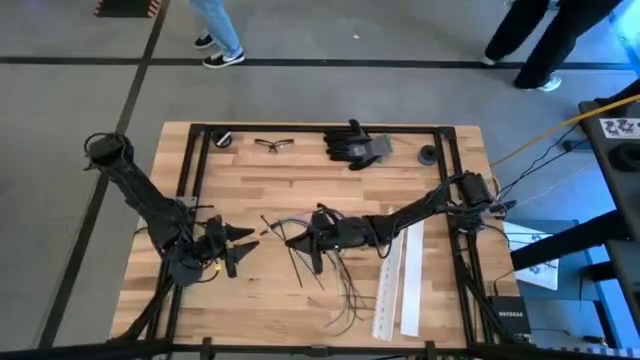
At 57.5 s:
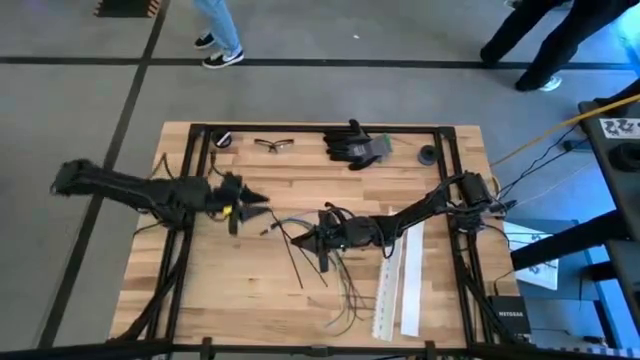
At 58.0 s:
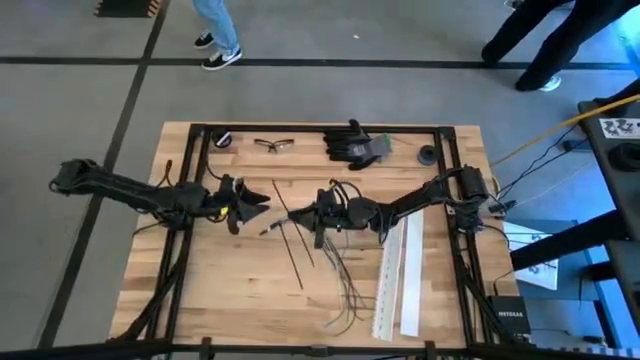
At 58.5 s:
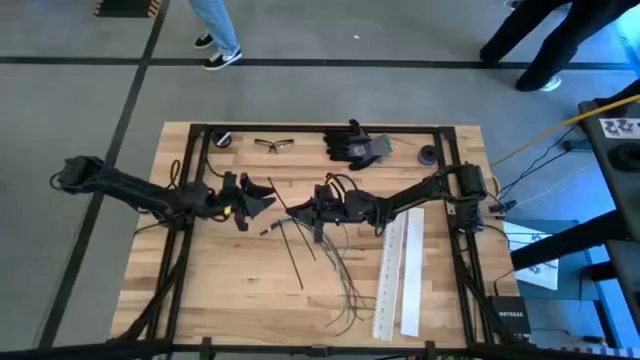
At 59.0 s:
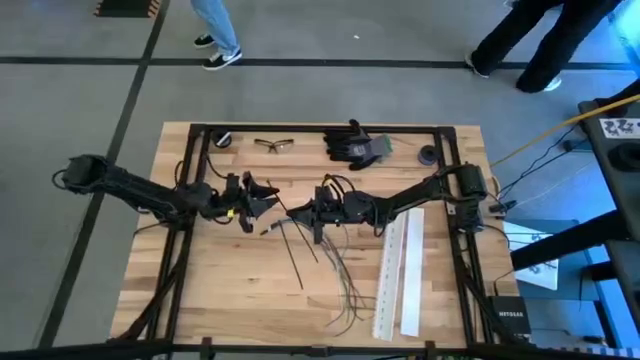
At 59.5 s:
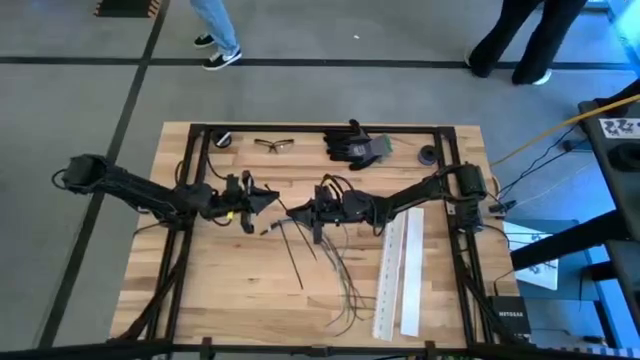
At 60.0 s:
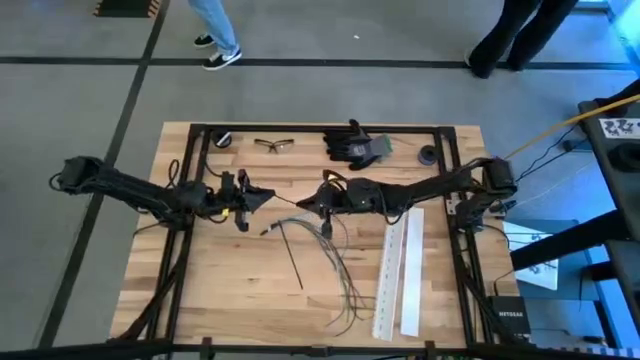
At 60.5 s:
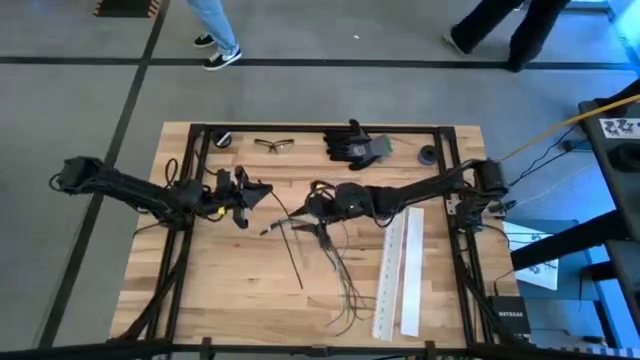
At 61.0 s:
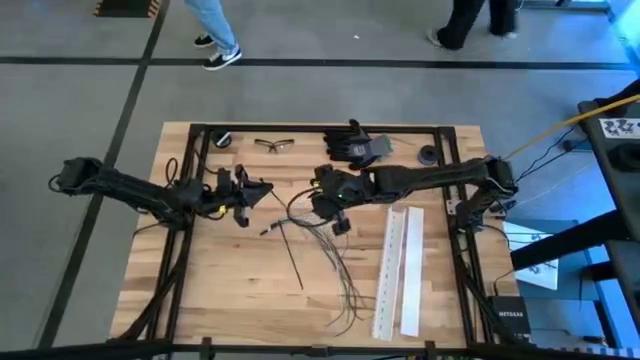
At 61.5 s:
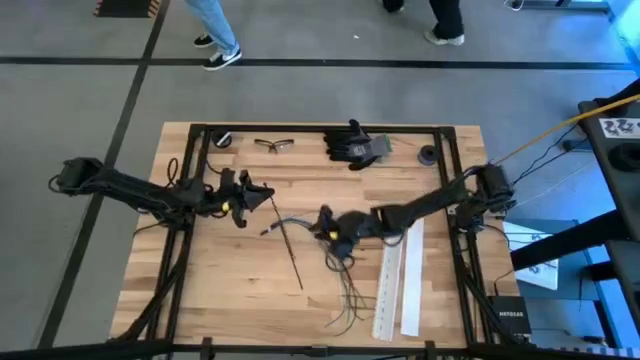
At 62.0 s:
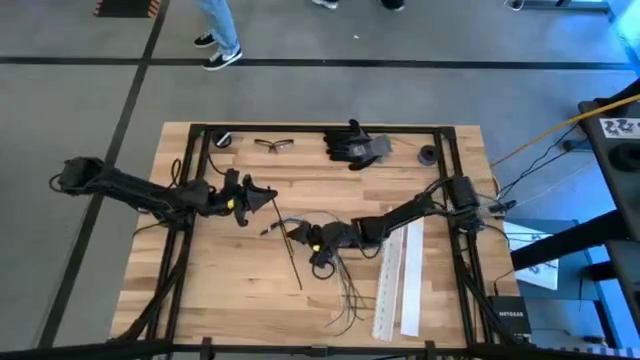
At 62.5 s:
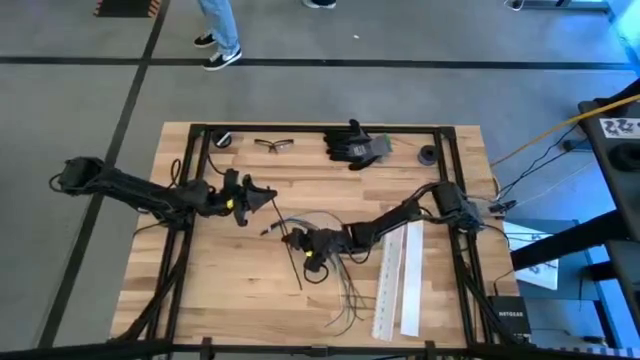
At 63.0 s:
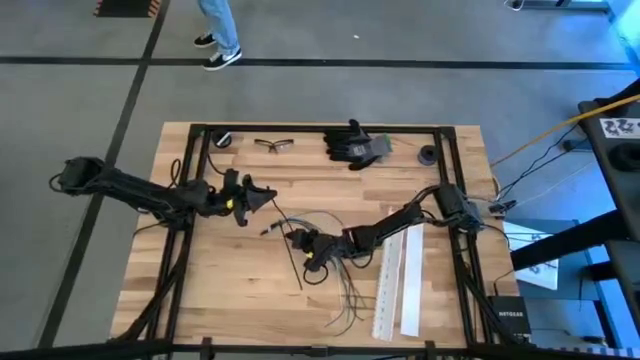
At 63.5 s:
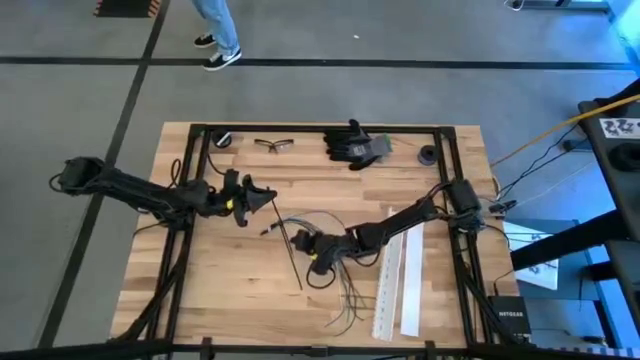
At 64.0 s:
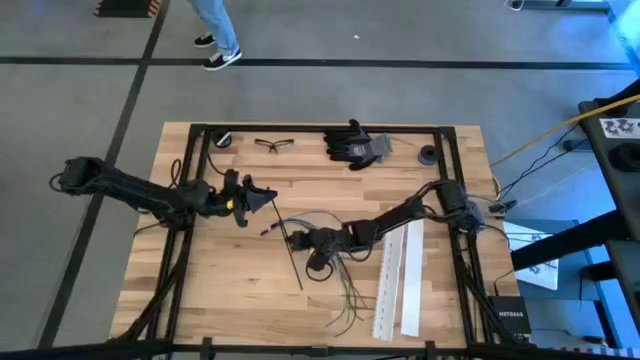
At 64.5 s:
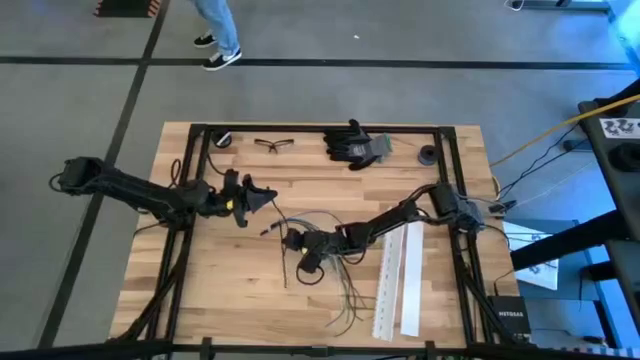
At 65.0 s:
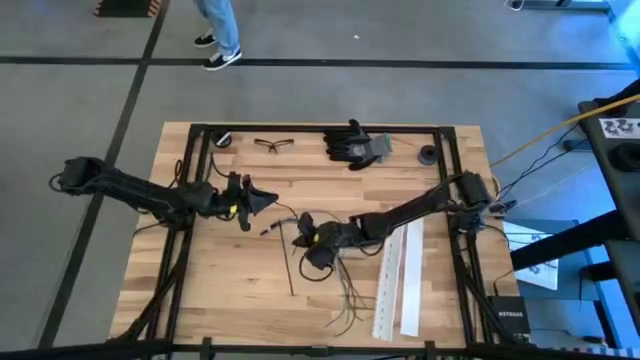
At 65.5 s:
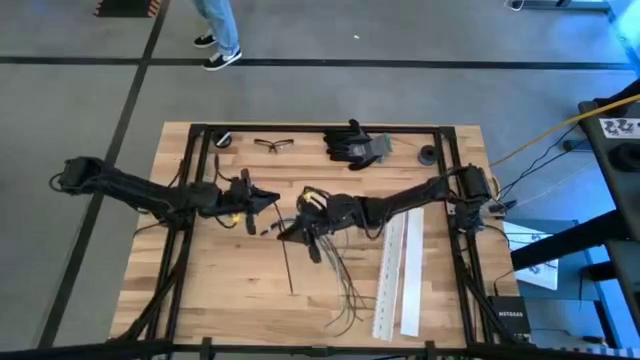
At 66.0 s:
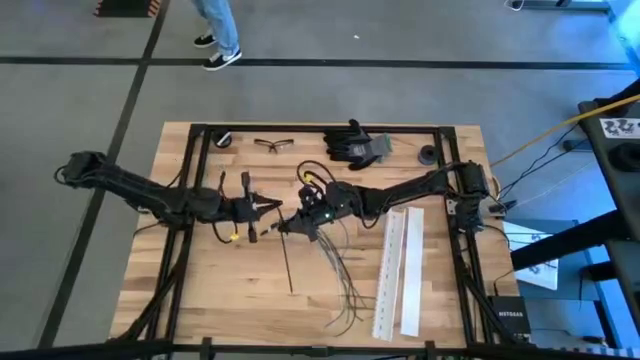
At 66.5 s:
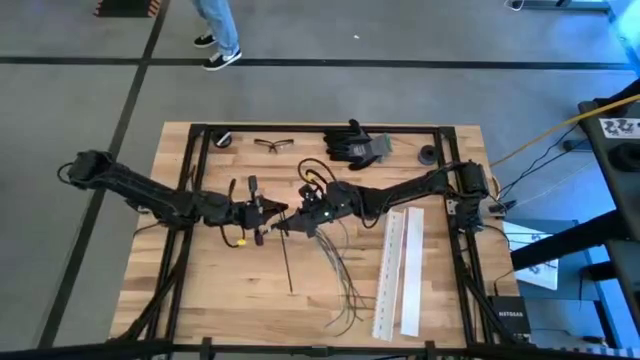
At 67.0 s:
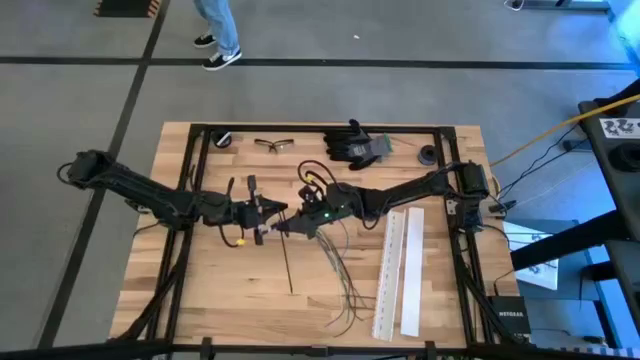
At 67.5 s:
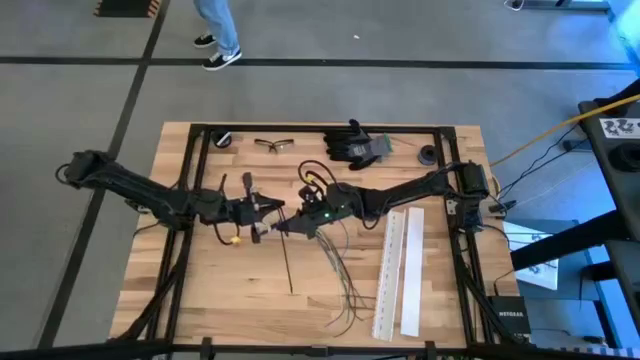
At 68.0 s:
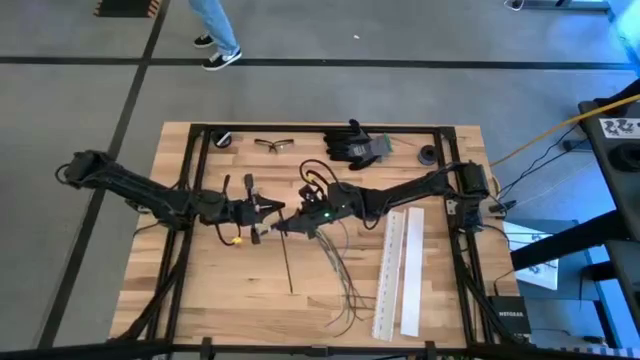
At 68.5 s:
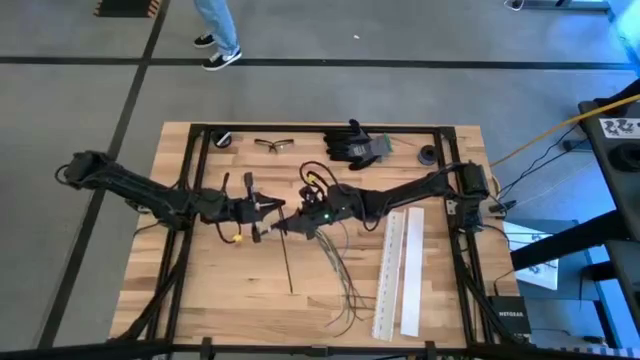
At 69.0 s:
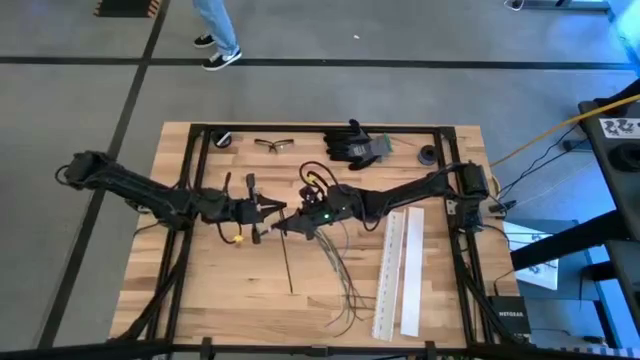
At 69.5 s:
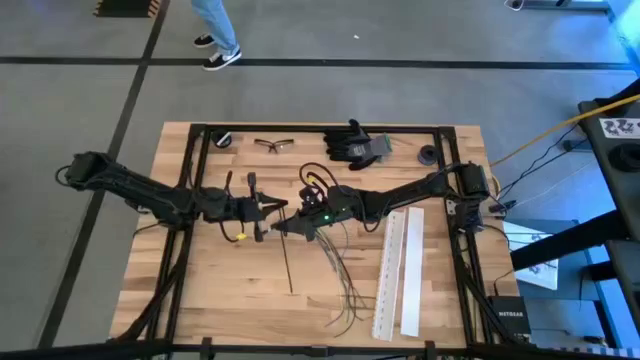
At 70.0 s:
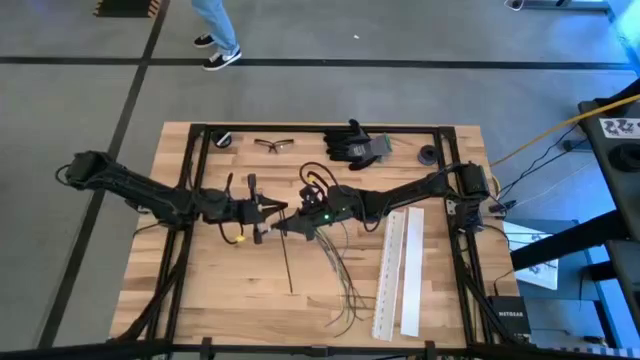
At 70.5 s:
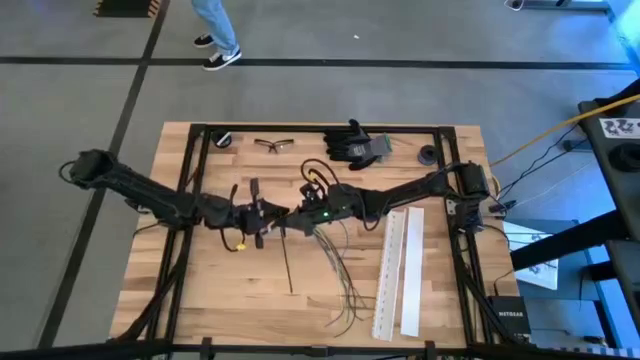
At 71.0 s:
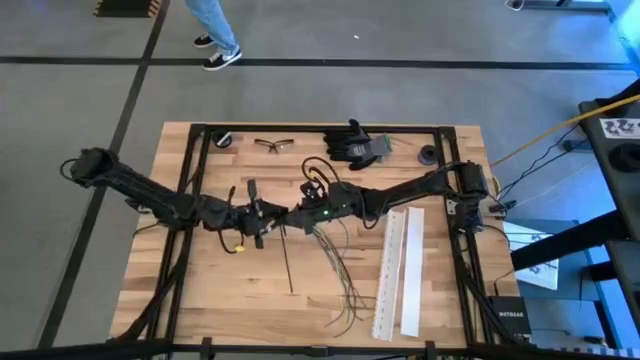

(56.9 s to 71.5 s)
Task: Ziptie cables
Wrap the zip tie on the cables

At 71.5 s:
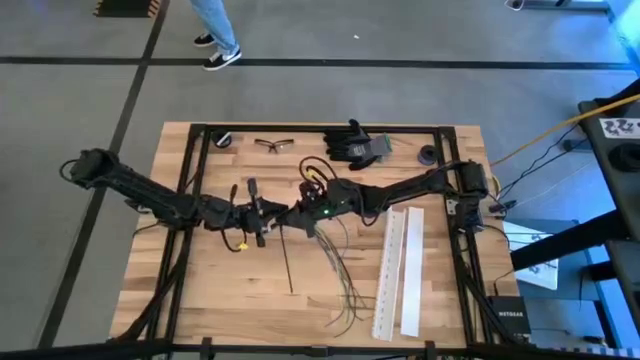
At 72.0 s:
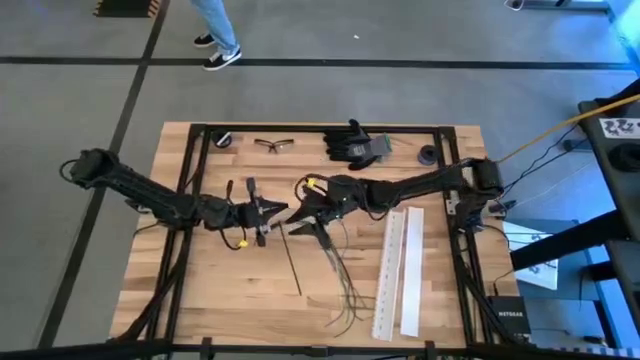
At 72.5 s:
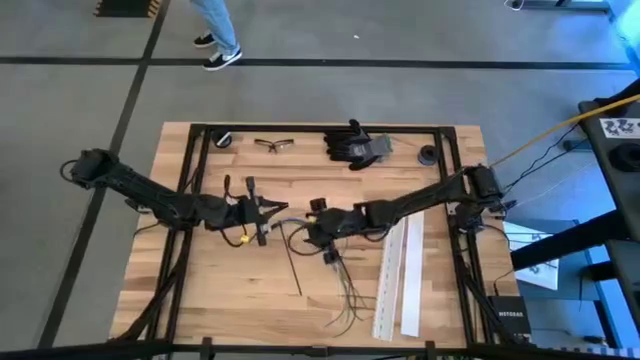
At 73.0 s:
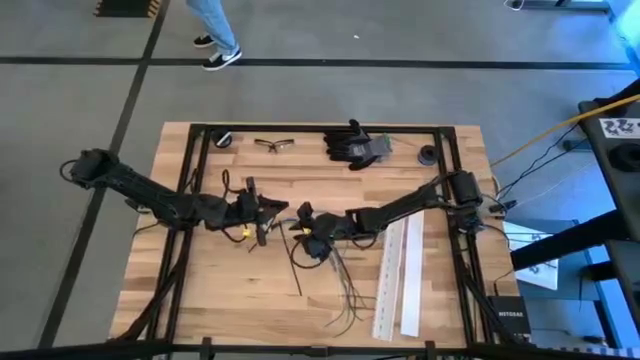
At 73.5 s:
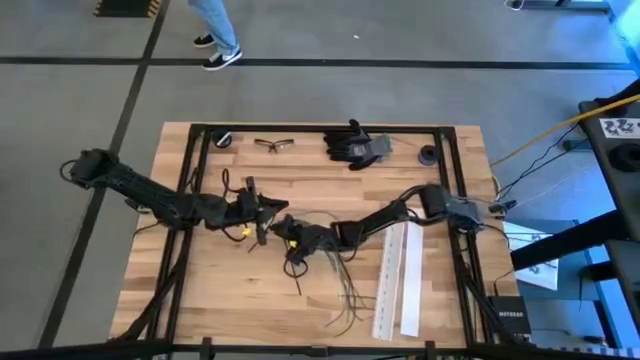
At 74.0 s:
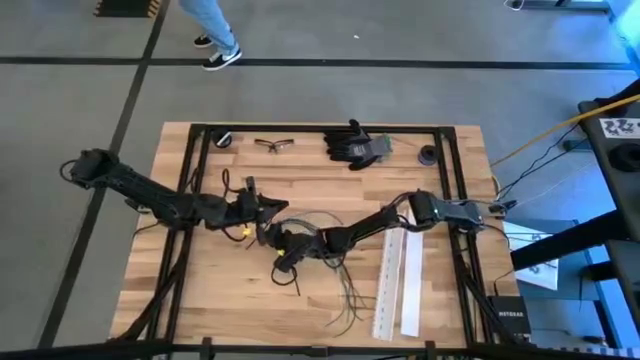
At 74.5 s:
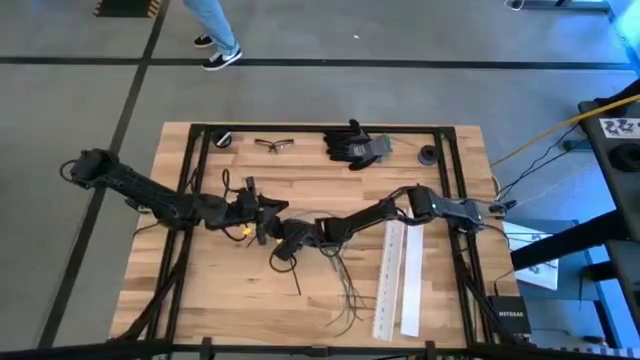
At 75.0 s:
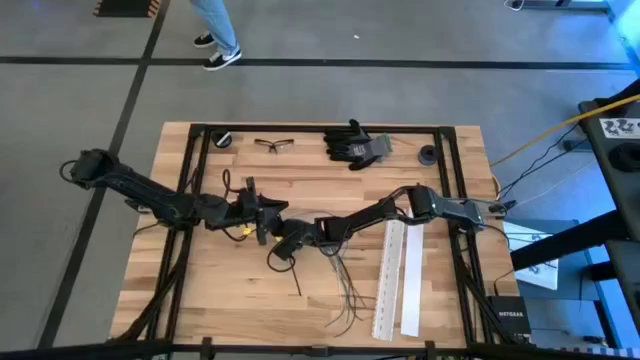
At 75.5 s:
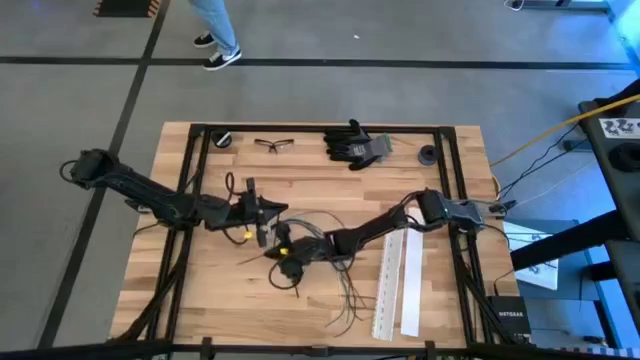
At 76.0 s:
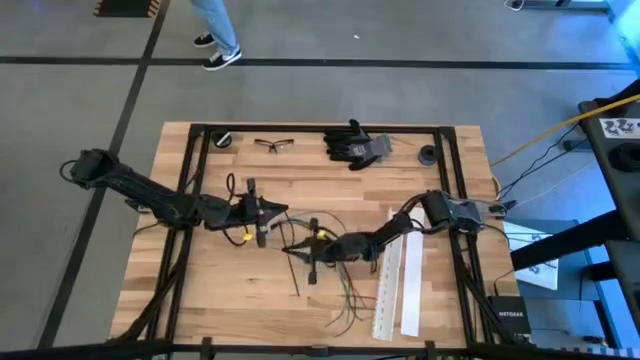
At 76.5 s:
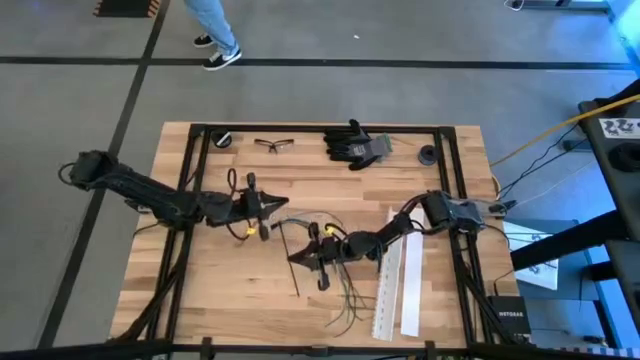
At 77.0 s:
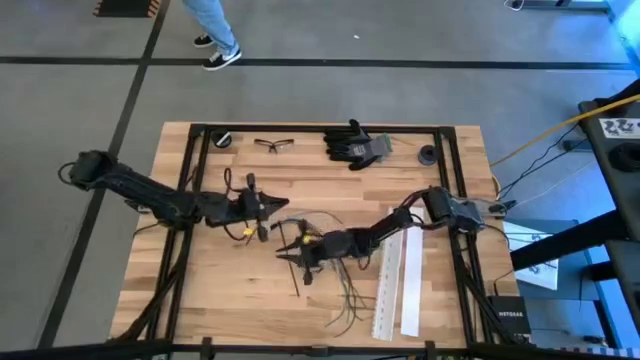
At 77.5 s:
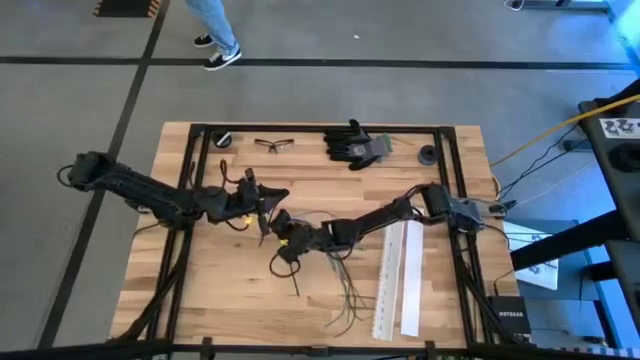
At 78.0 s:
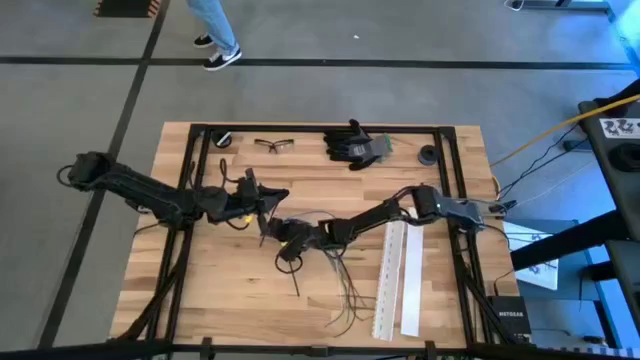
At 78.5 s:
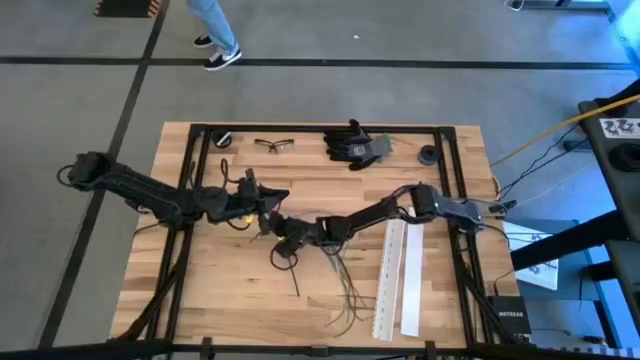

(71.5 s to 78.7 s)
Wrap the zip tie on the cables

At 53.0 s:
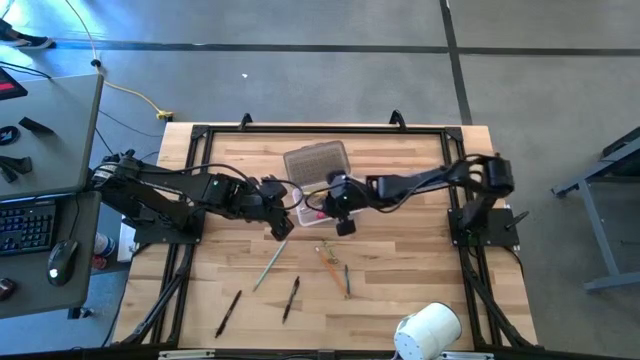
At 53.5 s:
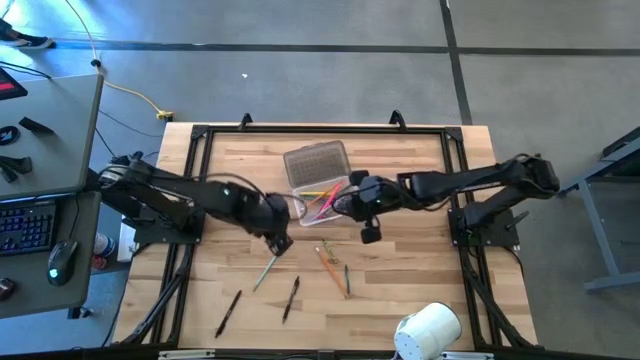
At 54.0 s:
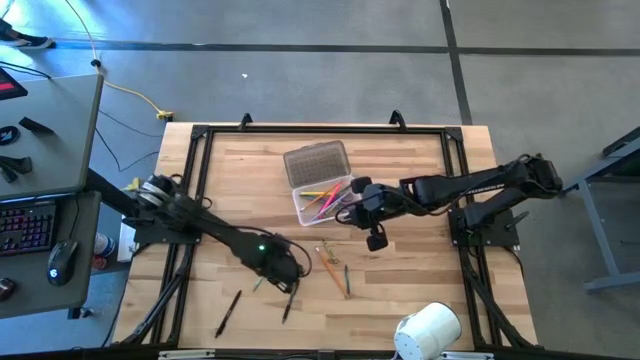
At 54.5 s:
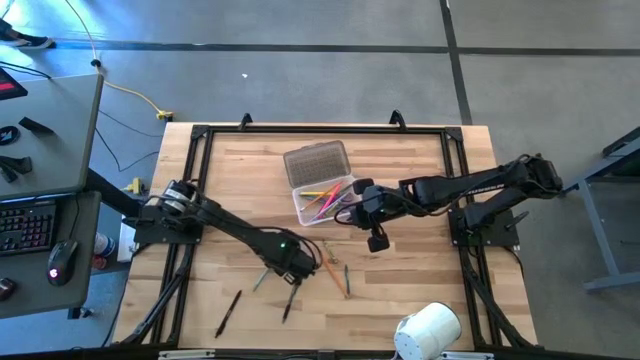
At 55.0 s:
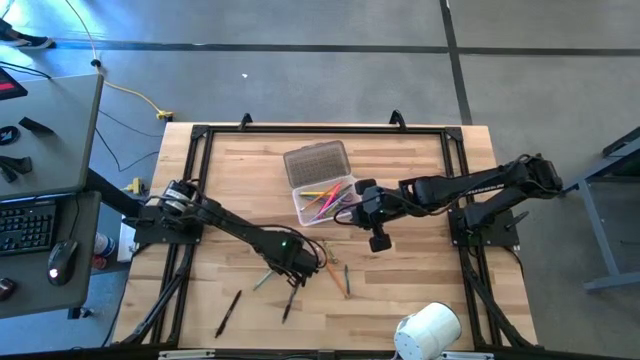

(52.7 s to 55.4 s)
Task: Pick & place school supplies into a supply box
Put the light blue pencil into the supply box
